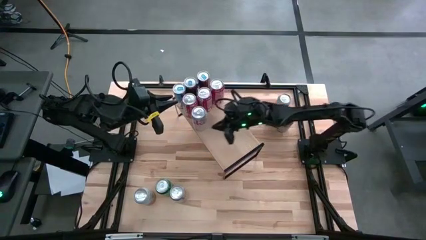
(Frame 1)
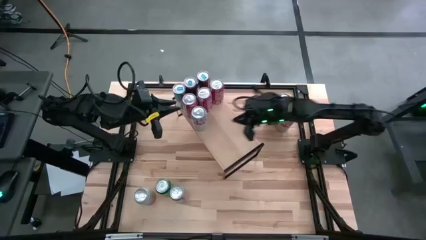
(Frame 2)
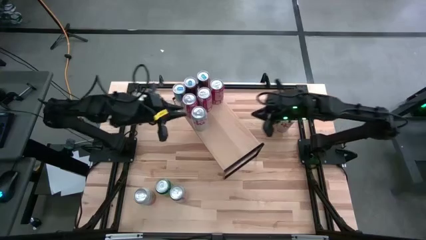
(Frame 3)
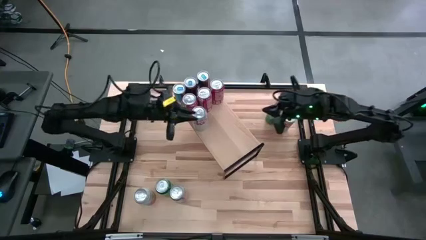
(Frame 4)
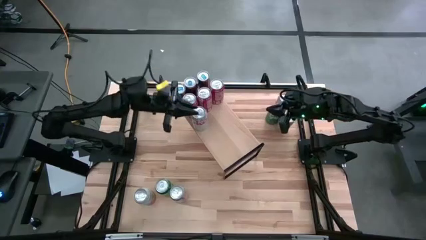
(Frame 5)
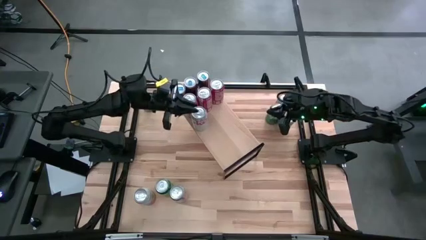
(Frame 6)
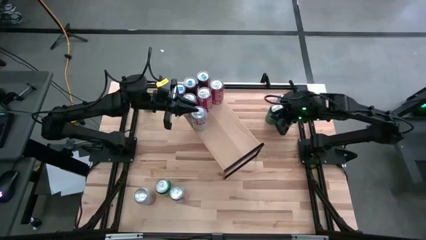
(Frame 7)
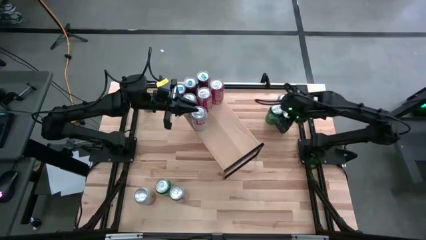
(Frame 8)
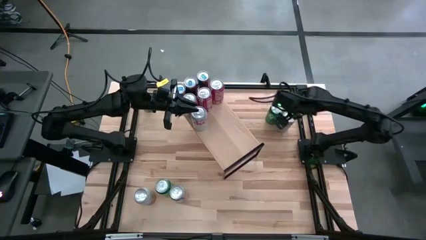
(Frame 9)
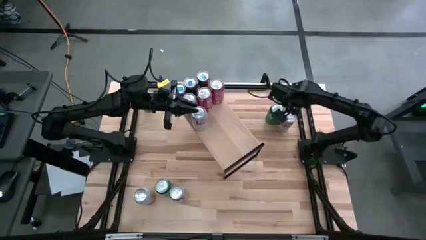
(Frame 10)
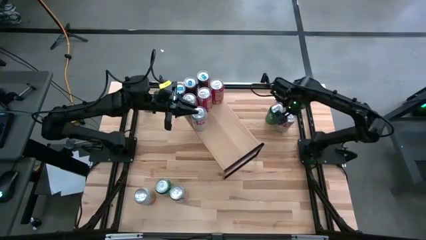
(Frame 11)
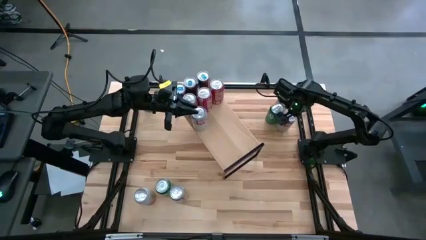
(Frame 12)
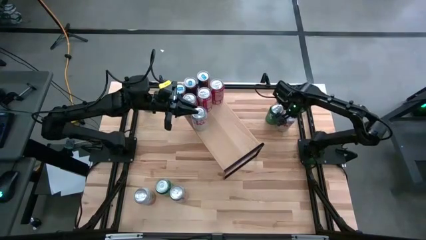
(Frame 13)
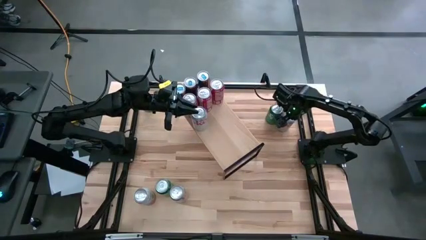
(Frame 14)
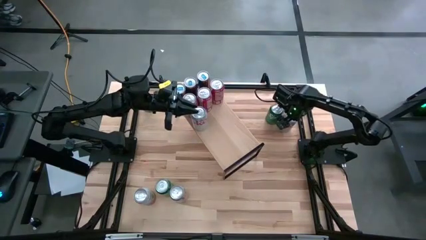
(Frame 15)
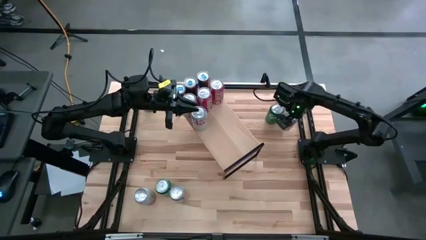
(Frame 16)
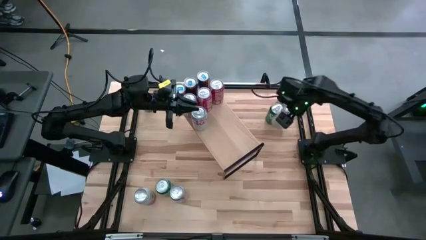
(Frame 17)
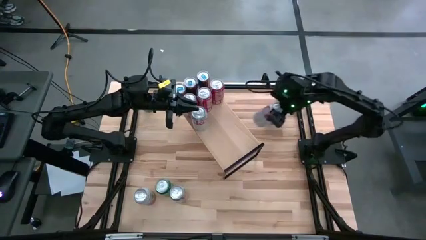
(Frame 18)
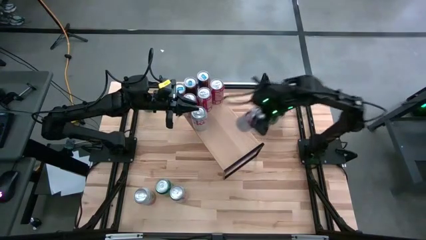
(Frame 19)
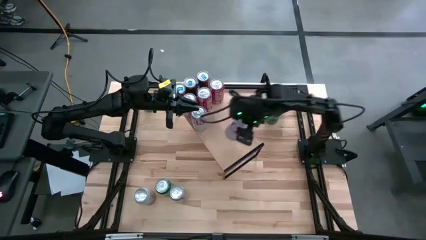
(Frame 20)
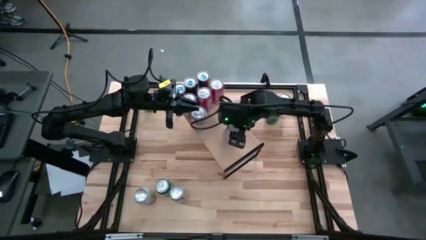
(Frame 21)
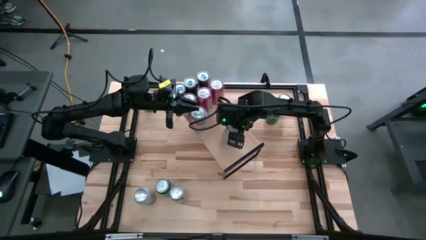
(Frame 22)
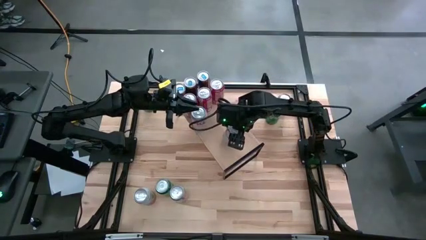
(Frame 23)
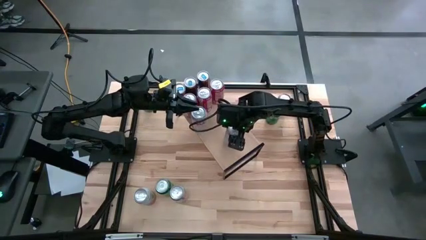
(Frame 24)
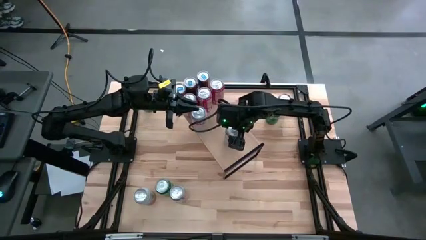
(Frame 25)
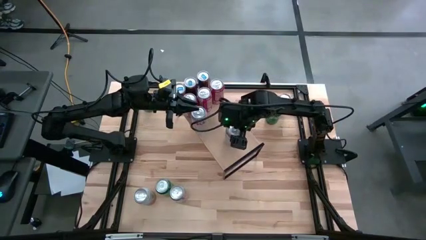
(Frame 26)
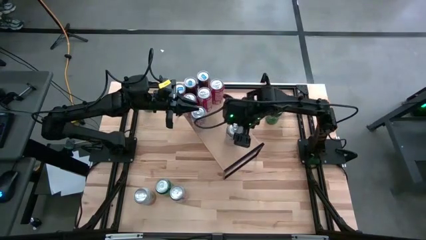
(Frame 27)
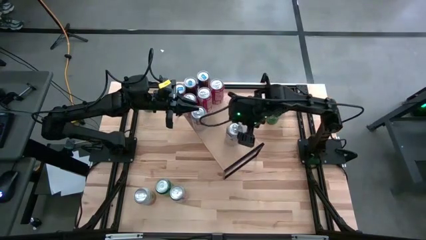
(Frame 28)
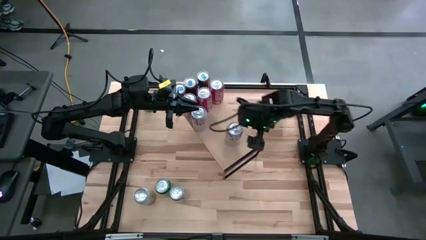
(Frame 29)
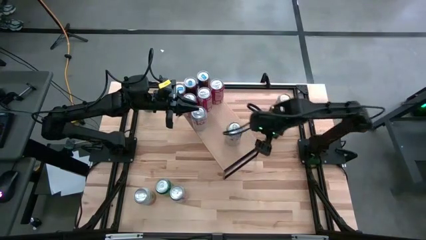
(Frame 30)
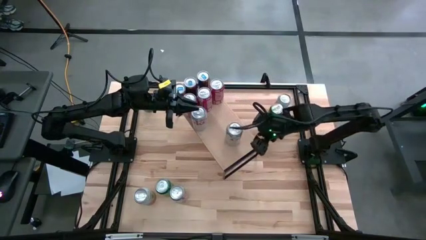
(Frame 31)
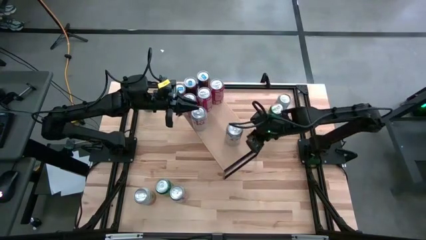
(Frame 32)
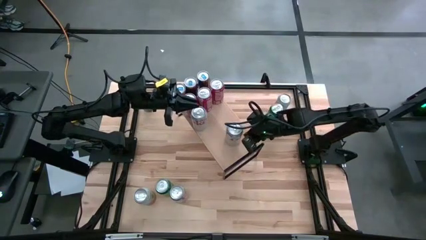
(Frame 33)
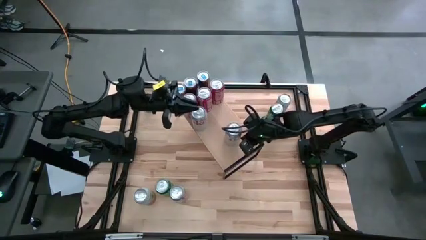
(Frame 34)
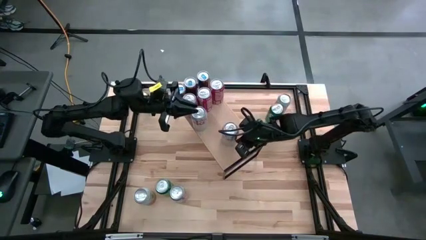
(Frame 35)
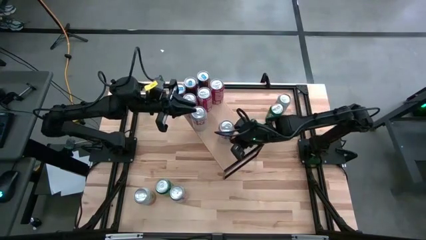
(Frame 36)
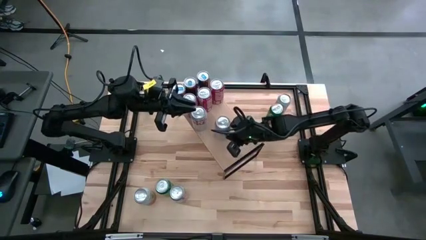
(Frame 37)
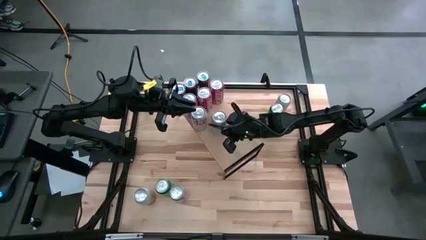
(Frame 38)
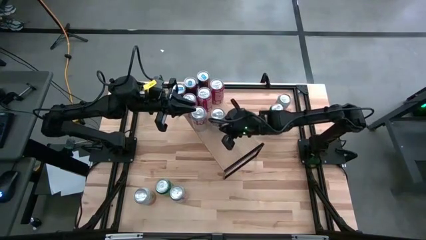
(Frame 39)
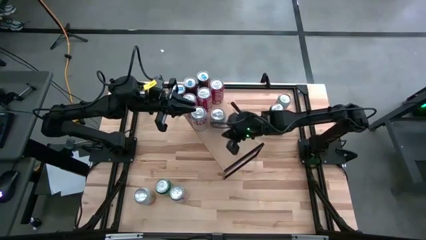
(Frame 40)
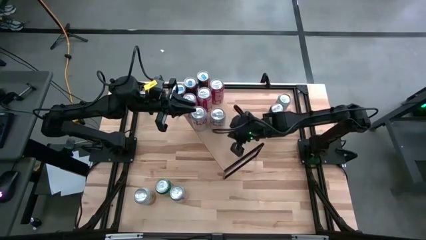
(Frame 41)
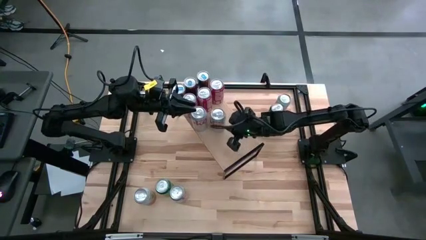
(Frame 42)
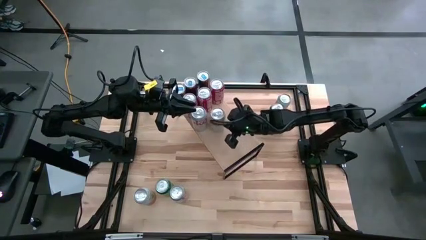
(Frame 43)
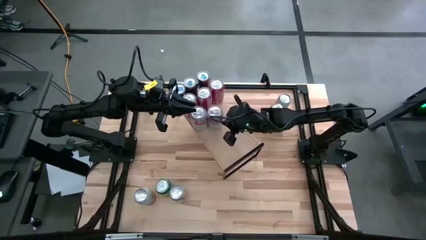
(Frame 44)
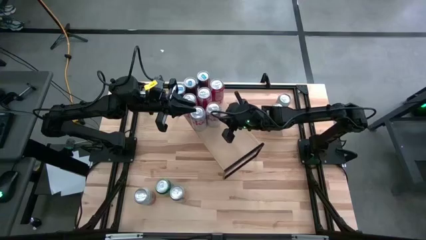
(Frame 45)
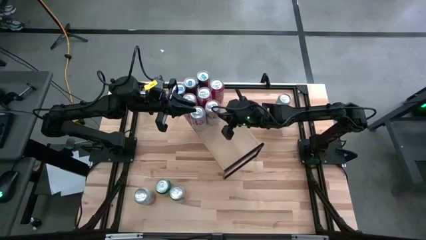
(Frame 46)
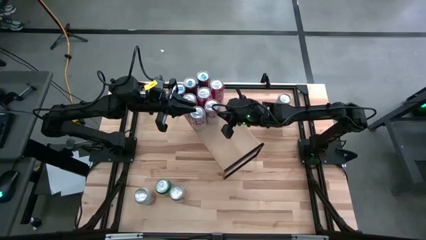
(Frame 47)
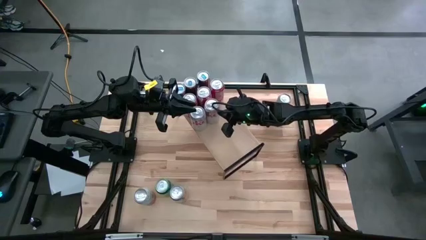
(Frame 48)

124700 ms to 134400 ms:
Task: Place canned beverage on shelf
Put the top silver soda can on the shelf aligned with the other silver soda can

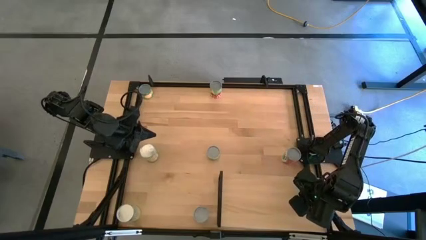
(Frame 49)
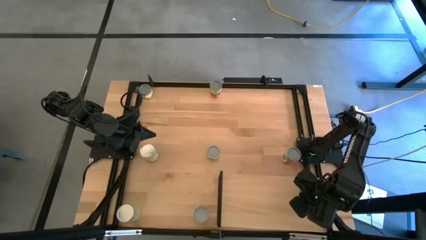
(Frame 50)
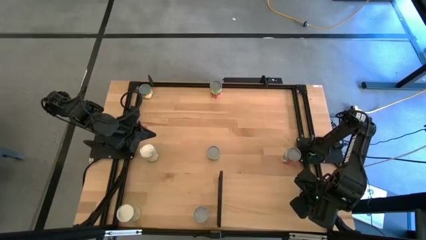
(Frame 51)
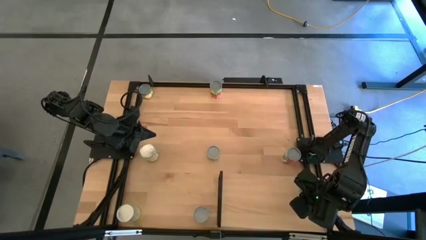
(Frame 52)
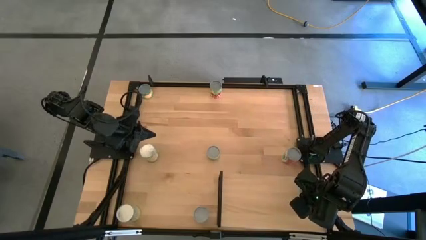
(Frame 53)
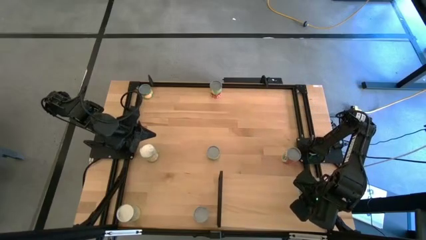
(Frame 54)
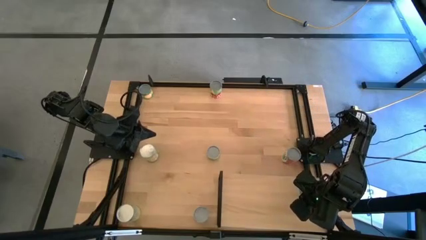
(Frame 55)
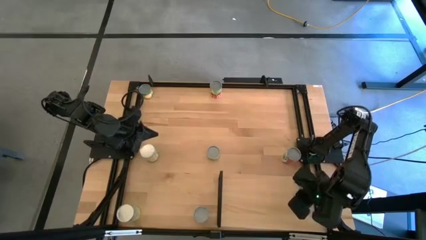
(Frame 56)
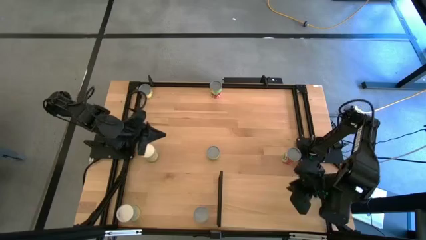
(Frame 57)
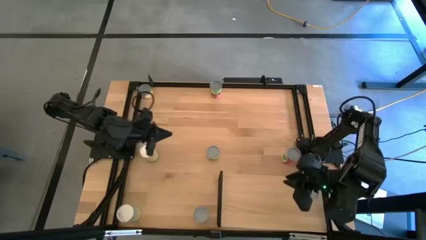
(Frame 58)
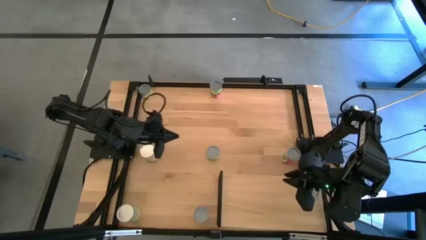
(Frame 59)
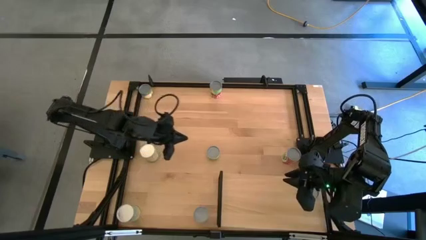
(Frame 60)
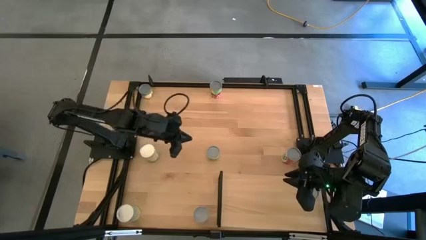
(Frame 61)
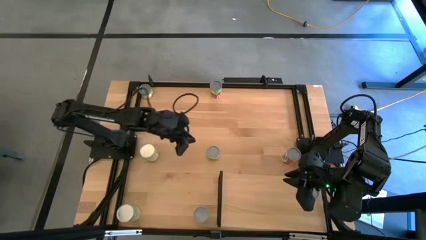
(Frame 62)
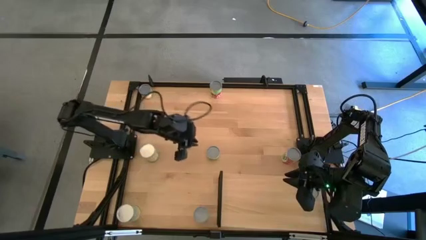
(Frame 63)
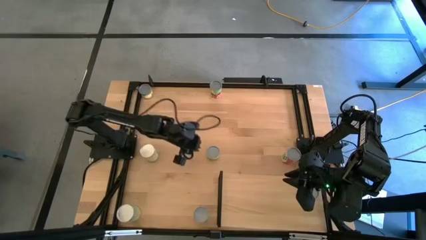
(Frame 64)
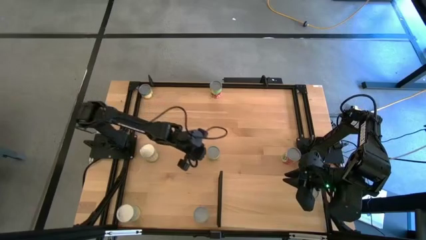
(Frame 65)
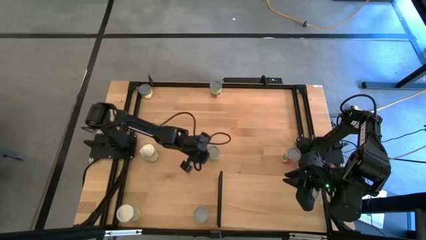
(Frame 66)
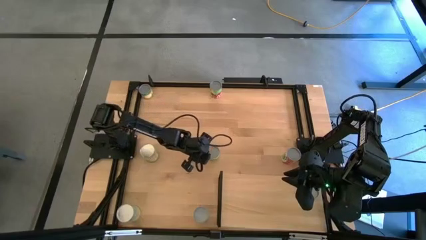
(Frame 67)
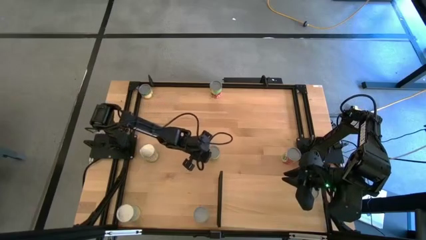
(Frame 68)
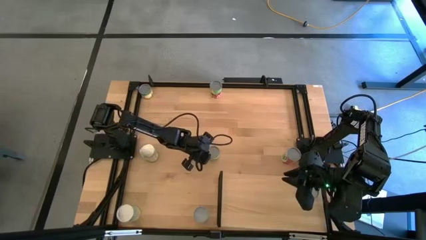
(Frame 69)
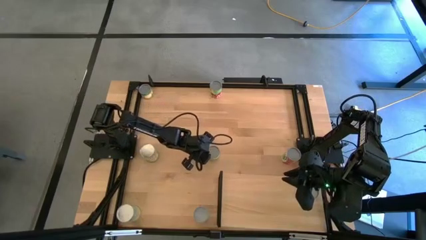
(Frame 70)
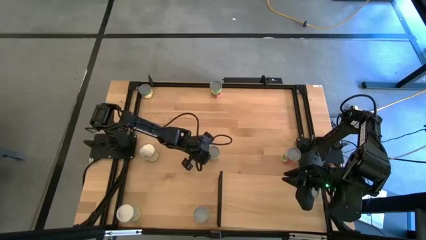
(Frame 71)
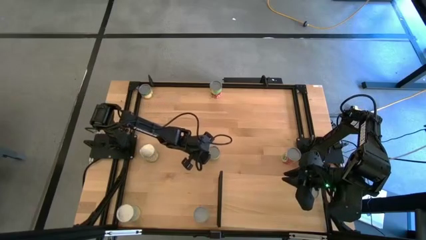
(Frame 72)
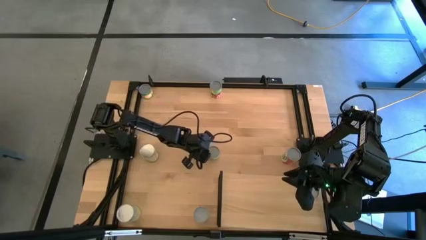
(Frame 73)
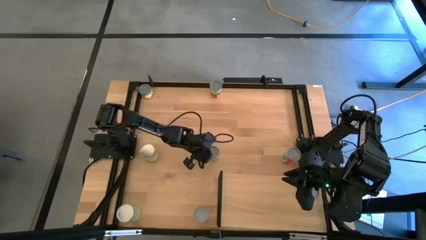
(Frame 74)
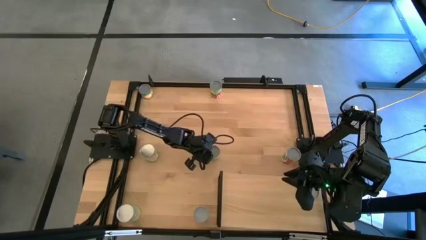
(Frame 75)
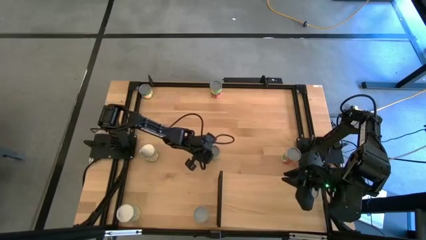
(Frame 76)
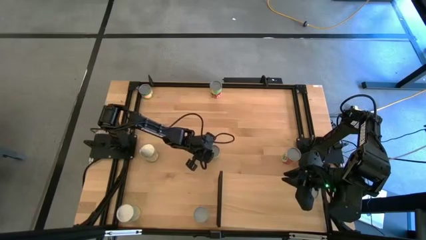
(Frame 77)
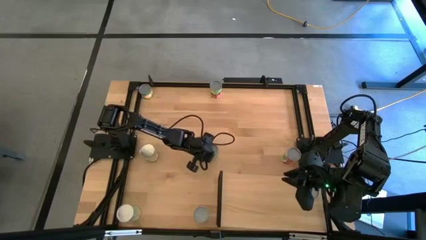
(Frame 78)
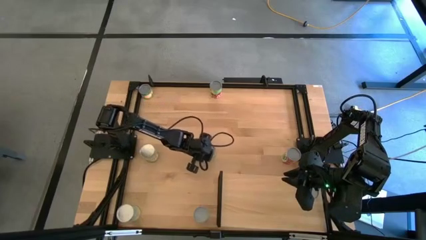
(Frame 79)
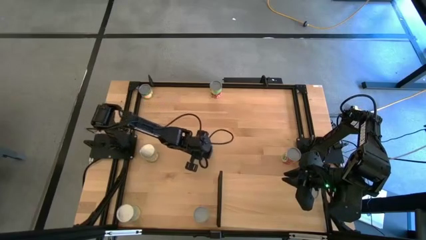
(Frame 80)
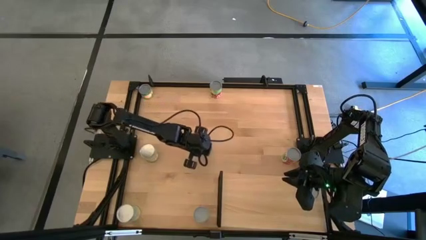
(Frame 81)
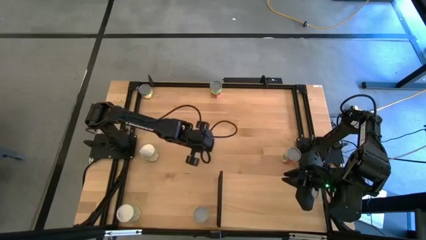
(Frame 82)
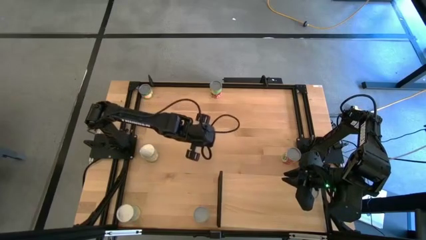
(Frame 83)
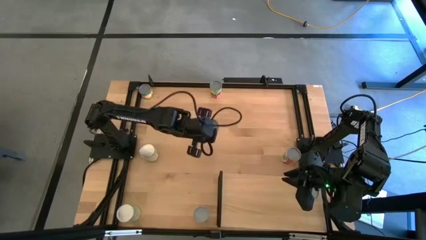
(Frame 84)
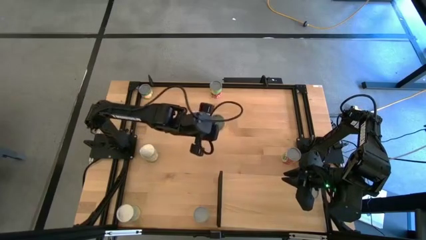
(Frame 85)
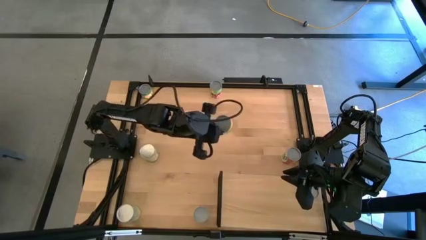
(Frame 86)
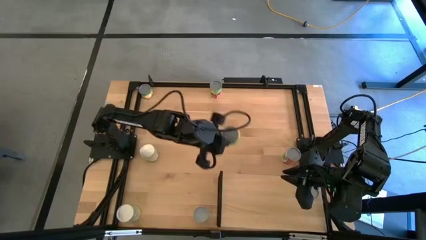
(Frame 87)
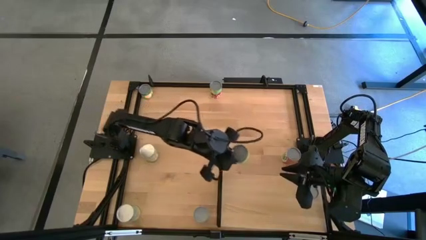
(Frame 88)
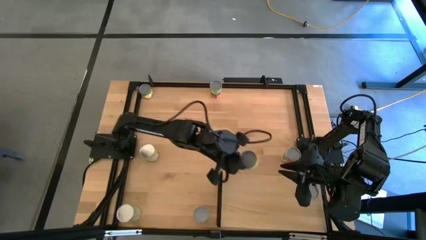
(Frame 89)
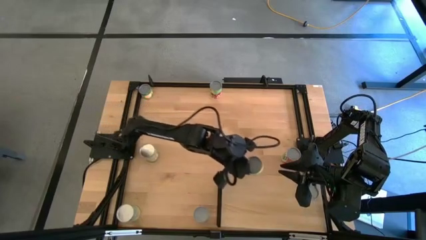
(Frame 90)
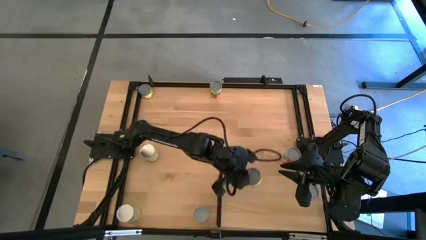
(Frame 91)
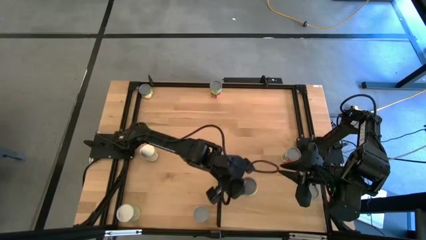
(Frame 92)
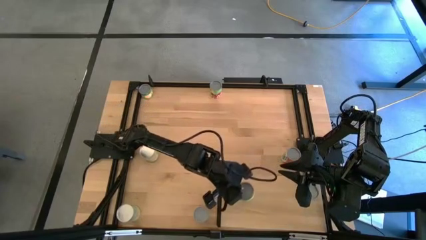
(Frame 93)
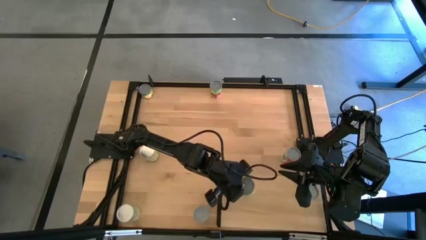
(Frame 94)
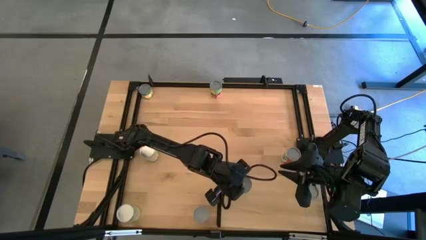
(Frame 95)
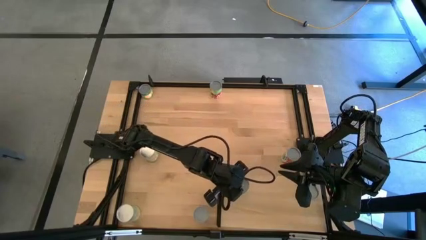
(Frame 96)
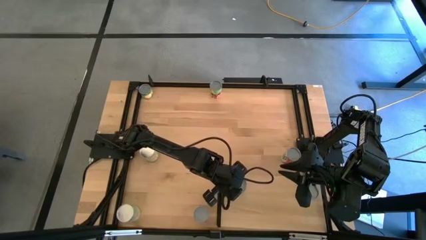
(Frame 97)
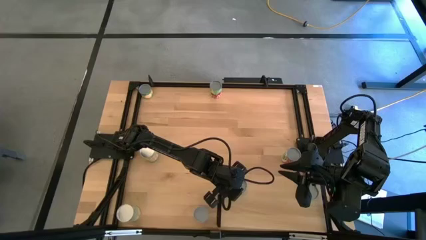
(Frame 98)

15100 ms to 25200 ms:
Task: Pick and place cans onto a shelf
Put the canned mushroom on the shelf
